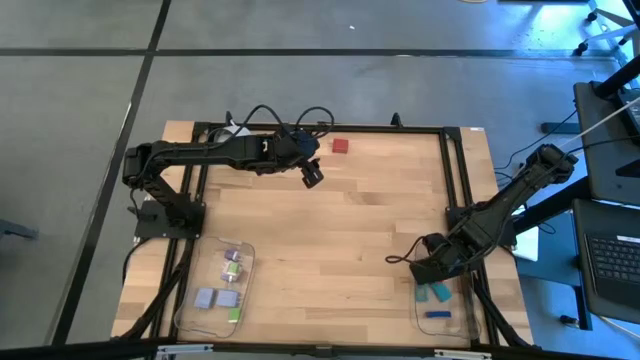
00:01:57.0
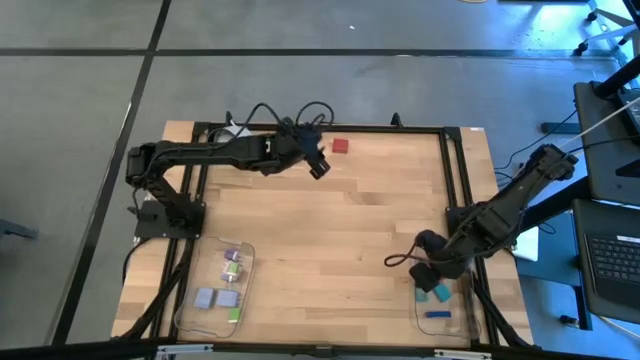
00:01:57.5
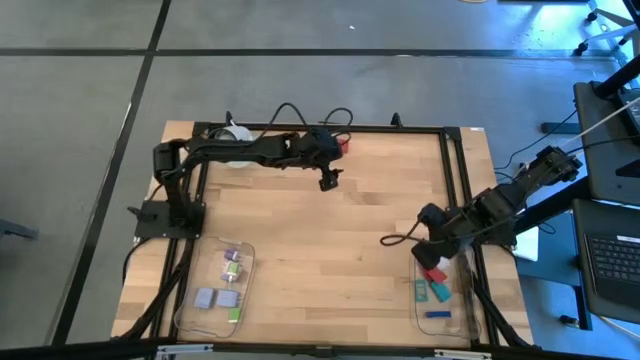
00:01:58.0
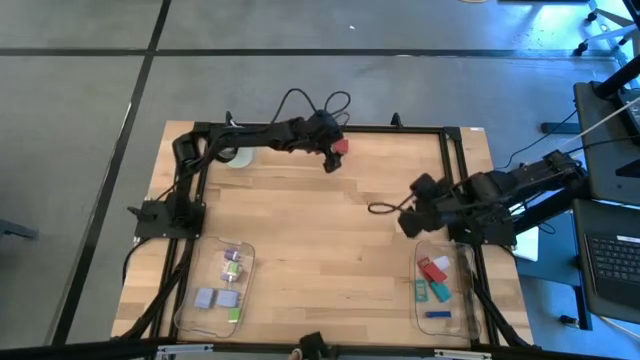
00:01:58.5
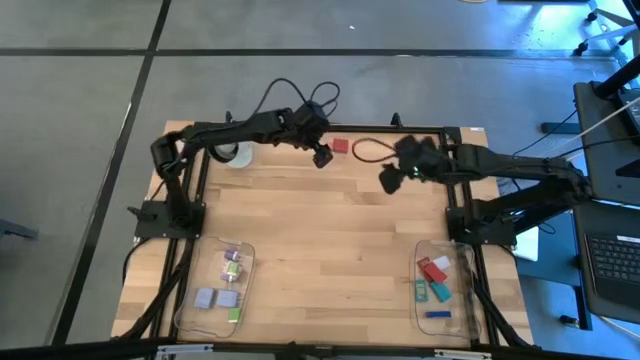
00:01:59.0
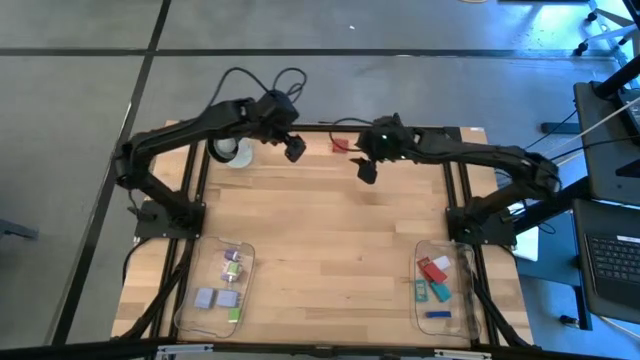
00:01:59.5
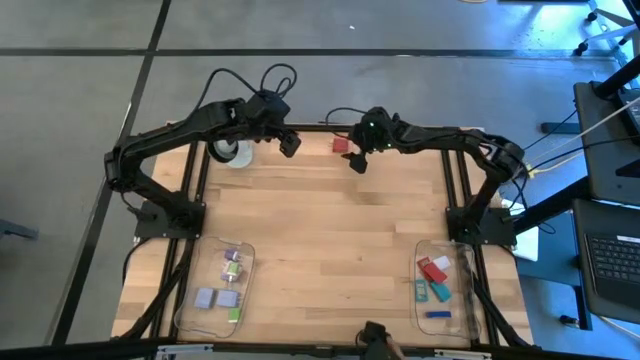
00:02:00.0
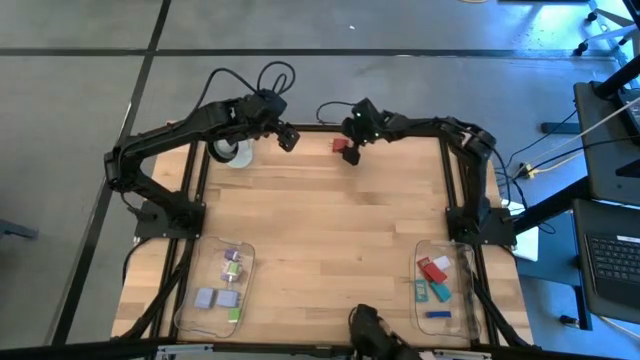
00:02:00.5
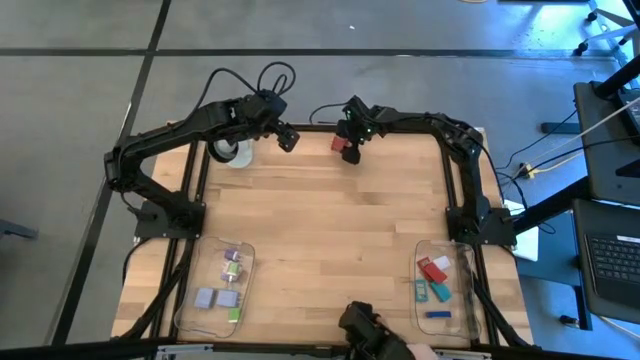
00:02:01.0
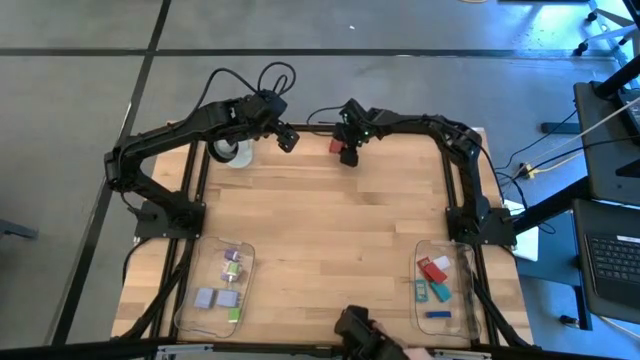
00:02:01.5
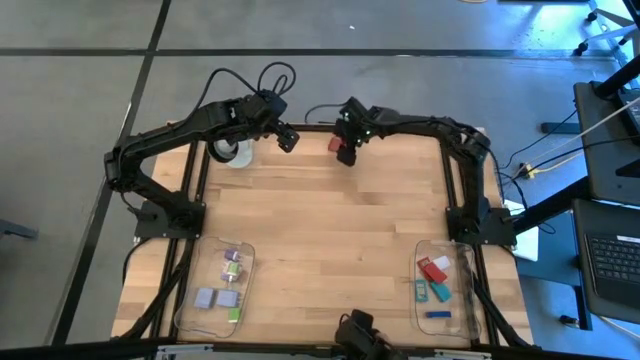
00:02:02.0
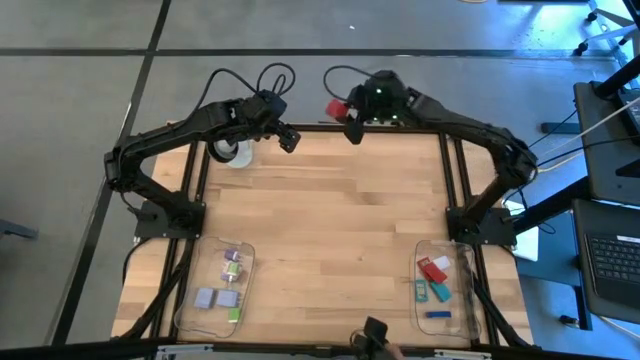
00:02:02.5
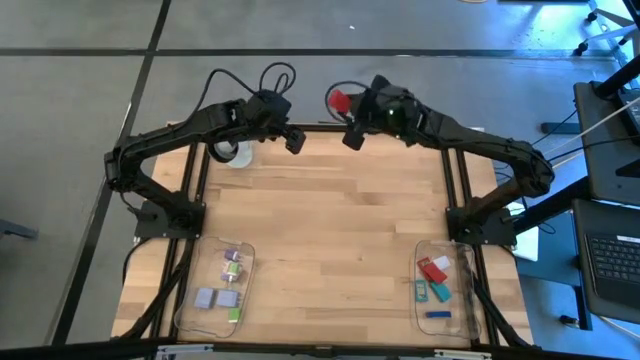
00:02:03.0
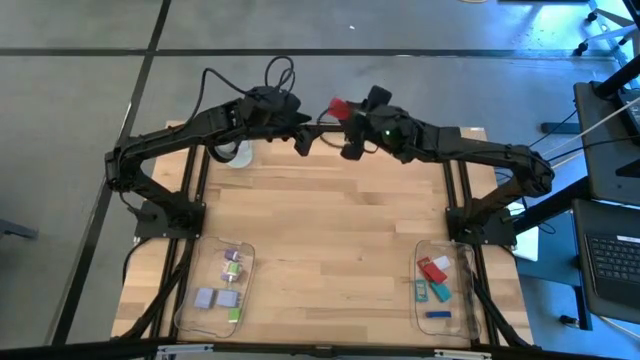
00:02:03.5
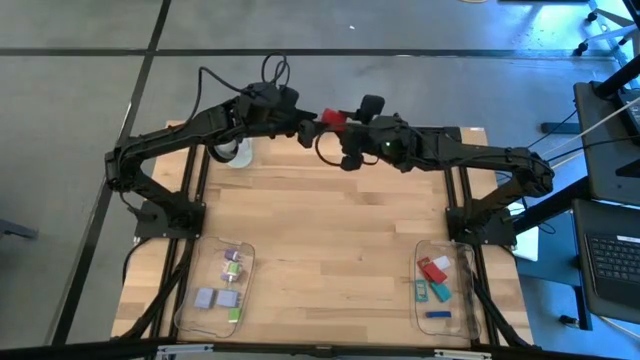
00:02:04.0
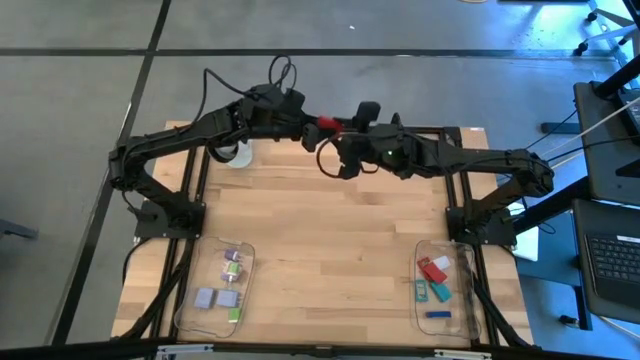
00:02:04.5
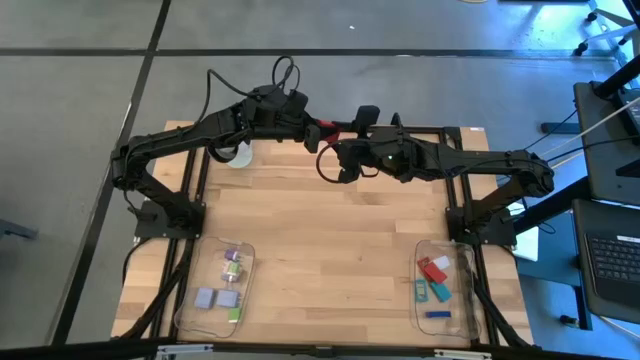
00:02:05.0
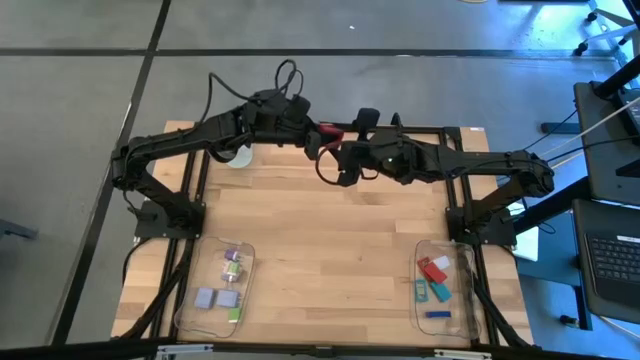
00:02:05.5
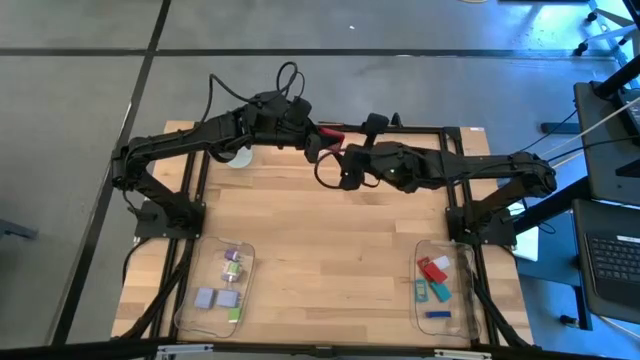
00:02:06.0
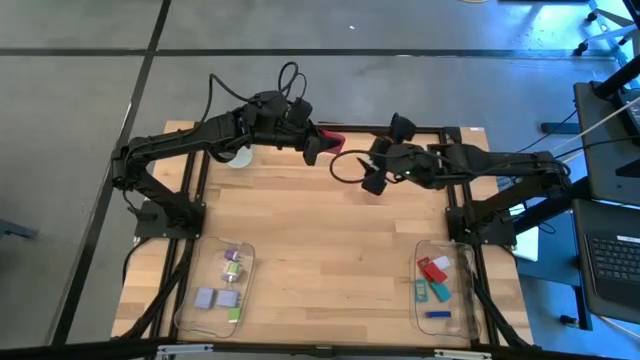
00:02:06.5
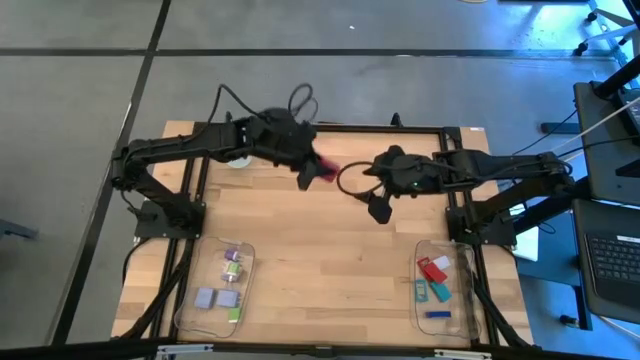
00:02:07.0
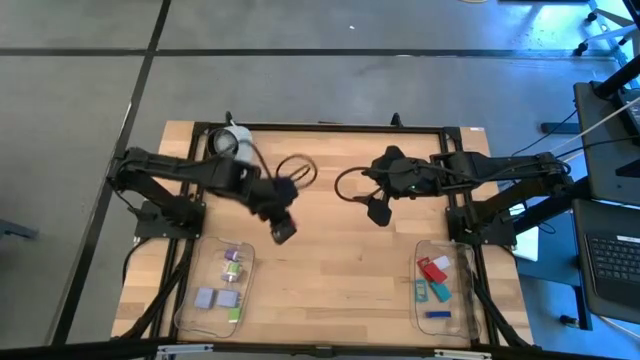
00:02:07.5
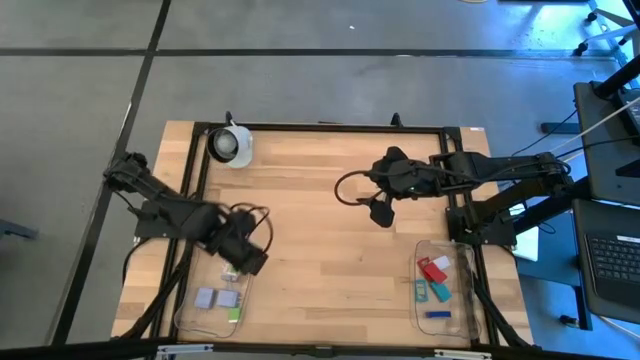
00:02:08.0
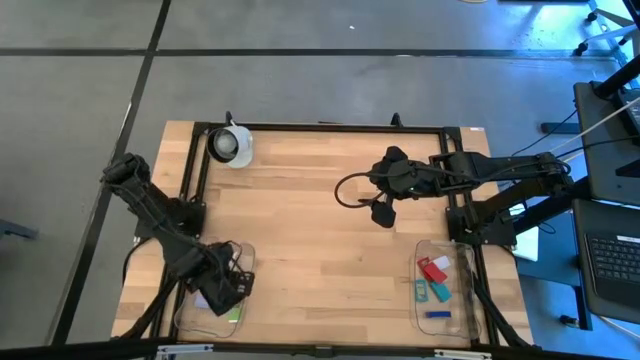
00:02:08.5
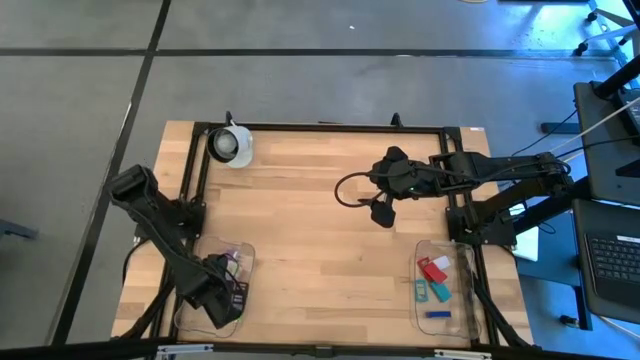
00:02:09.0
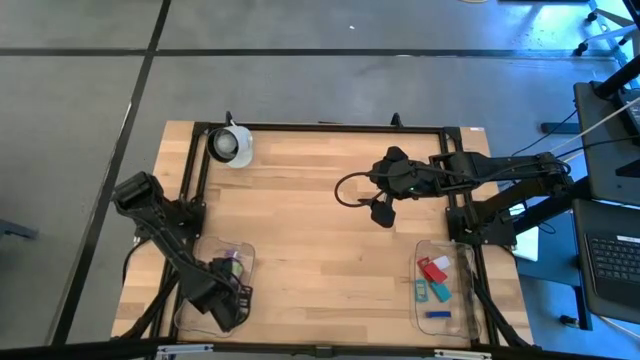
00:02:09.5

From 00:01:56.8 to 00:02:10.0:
Task: Pick & Place Office items
Put the orange adapter into the left transparent bin

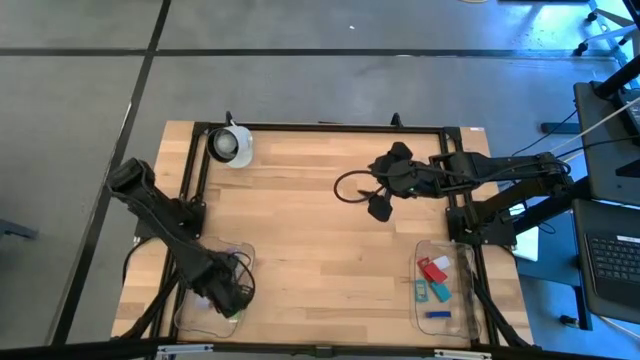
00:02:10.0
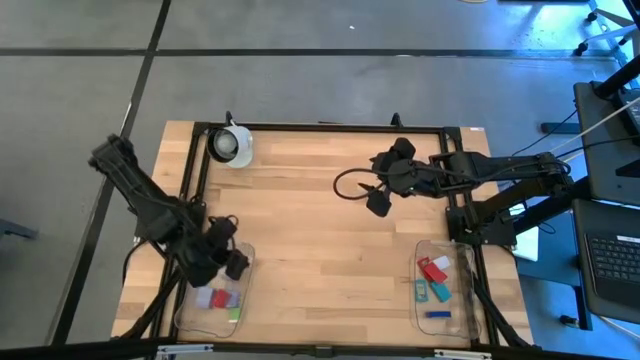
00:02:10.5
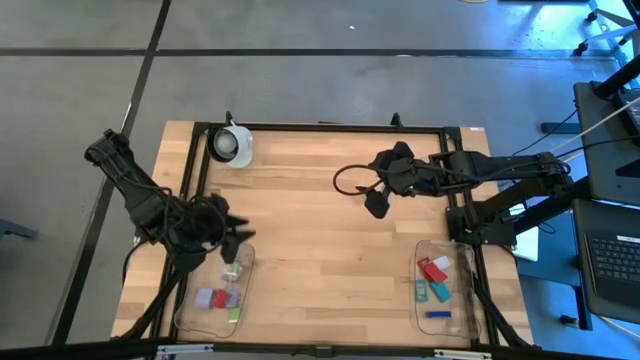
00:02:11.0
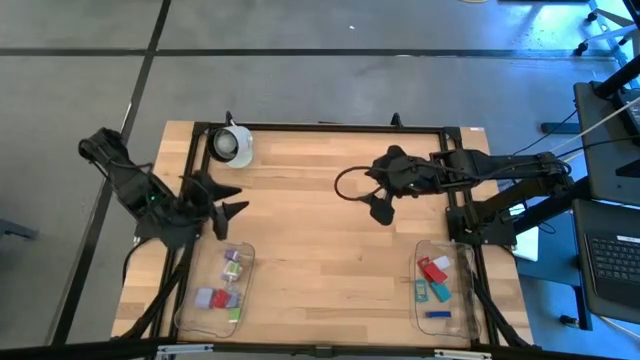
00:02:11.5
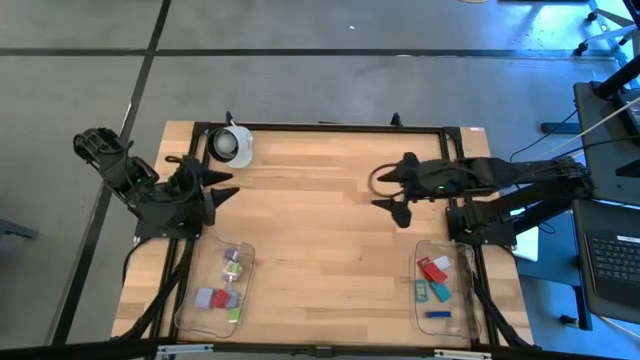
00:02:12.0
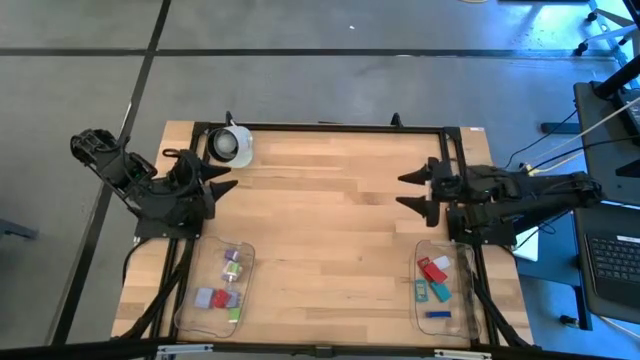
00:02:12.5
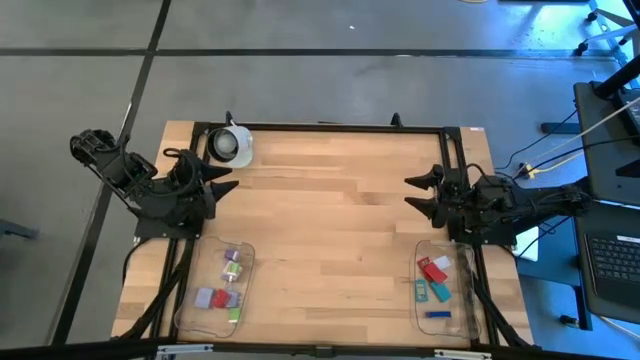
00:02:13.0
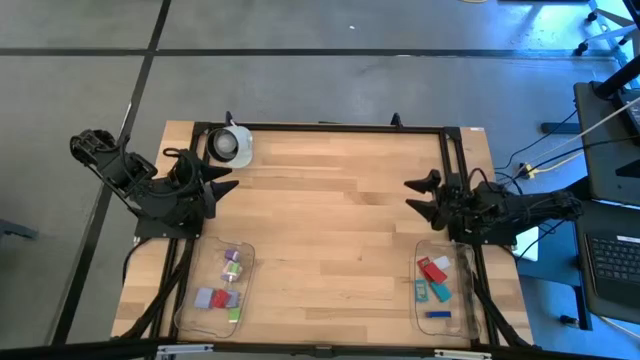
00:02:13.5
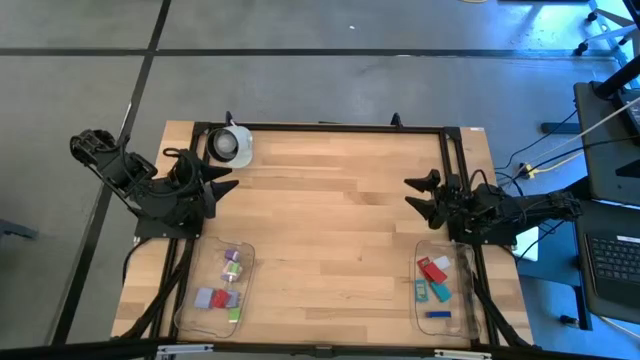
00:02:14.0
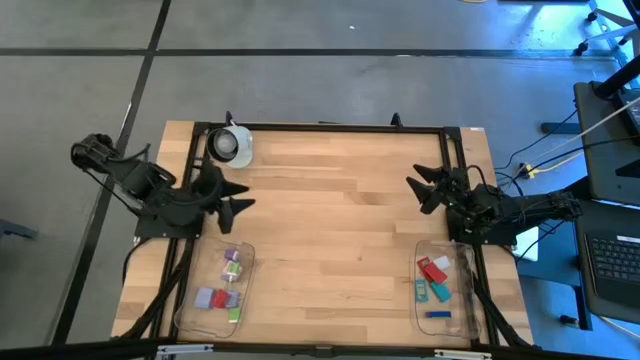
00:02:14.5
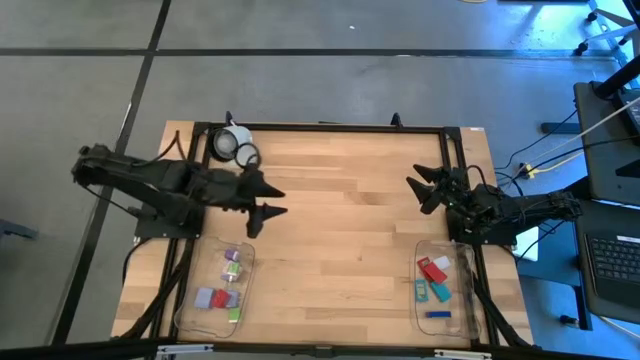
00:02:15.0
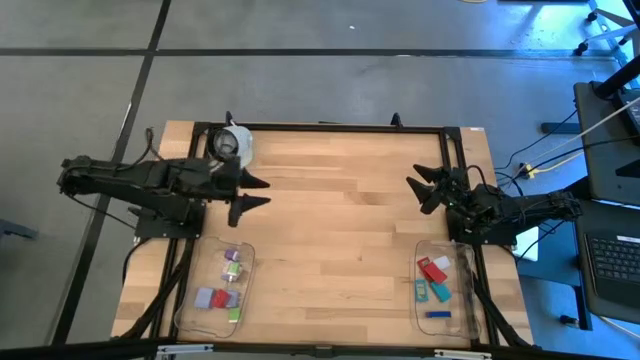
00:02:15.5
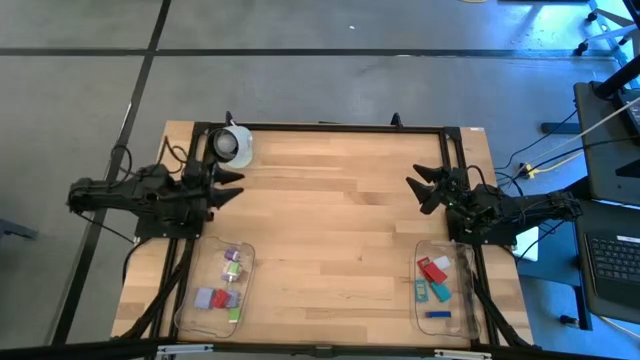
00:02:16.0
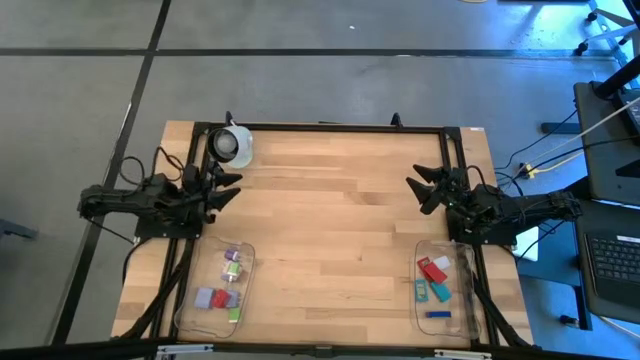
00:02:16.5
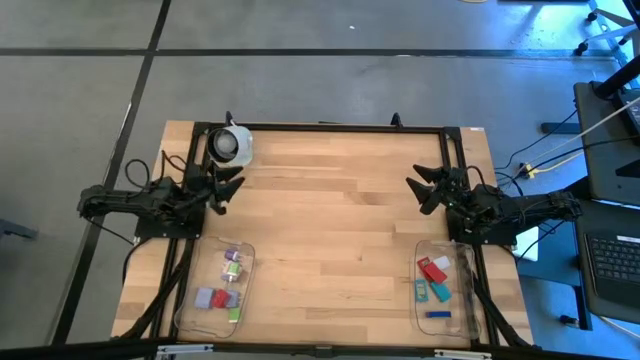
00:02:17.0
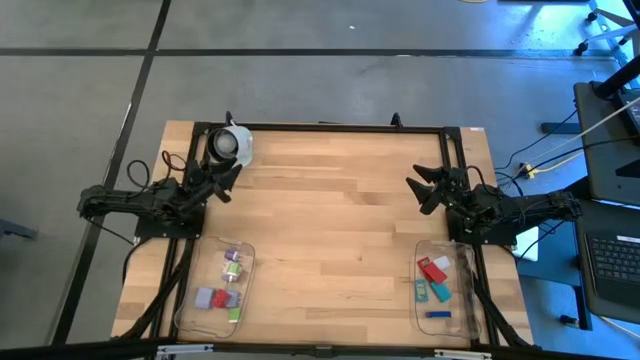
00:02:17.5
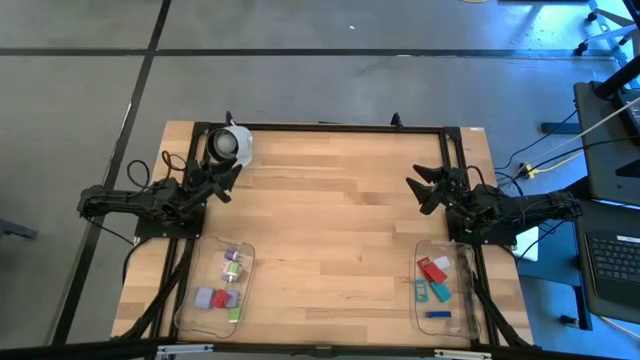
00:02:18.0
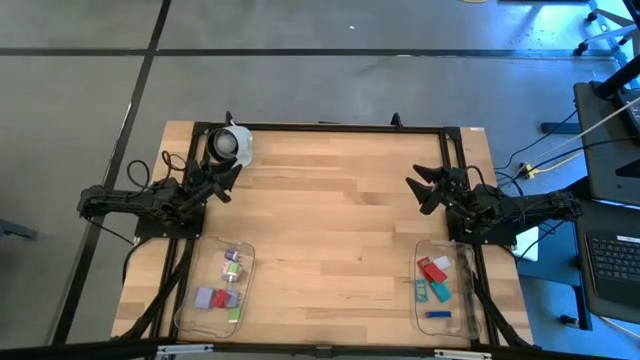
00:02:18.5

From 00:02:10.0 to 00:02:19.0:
Return to Home Position
